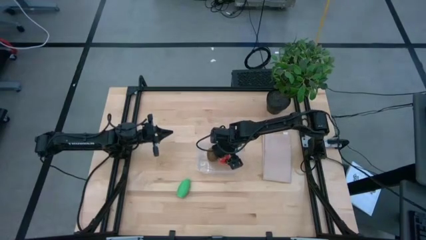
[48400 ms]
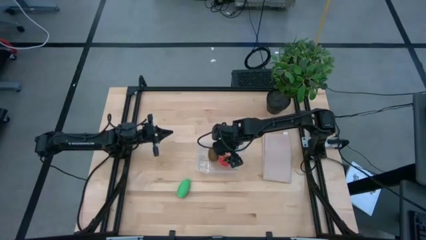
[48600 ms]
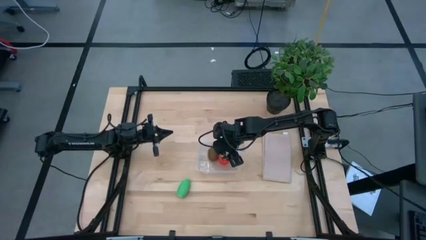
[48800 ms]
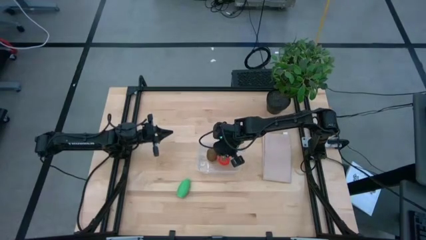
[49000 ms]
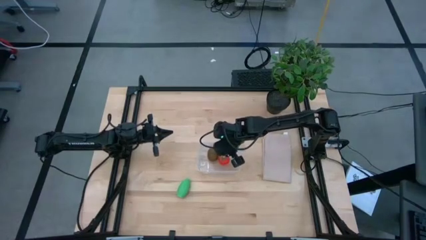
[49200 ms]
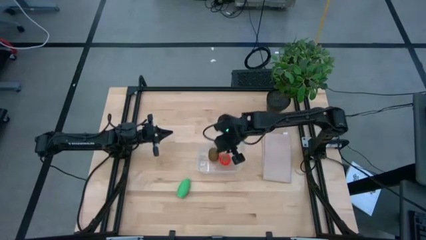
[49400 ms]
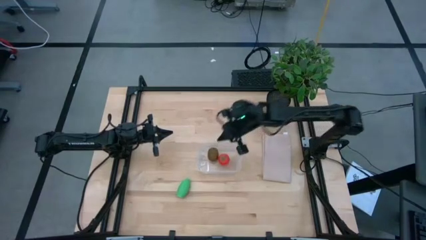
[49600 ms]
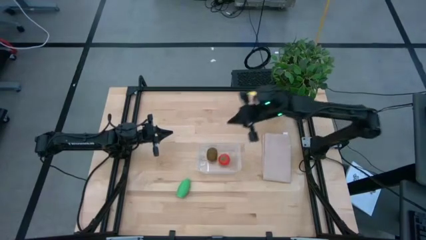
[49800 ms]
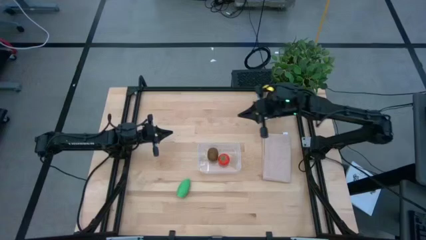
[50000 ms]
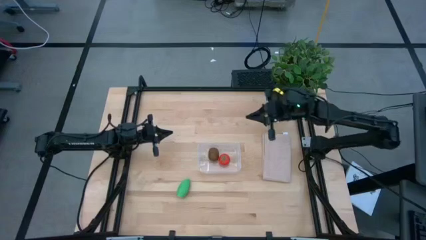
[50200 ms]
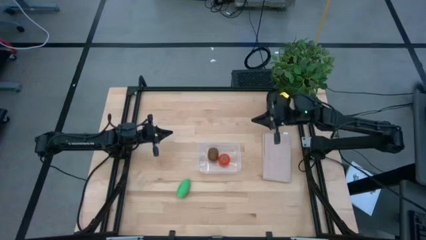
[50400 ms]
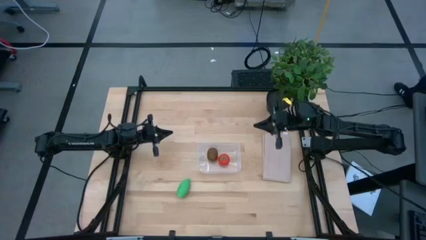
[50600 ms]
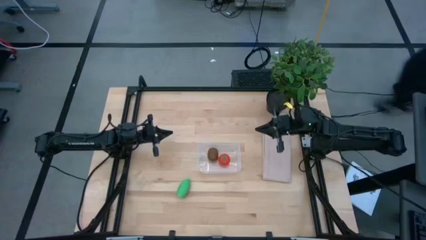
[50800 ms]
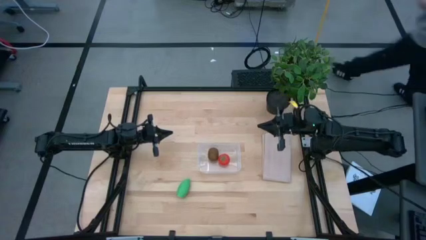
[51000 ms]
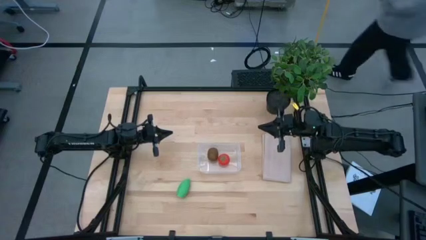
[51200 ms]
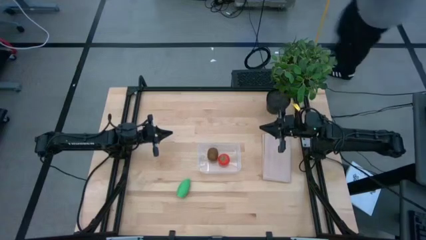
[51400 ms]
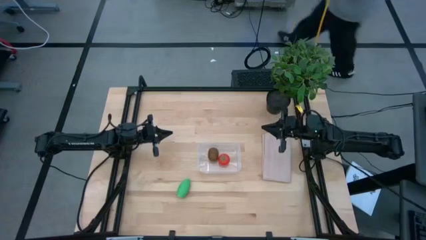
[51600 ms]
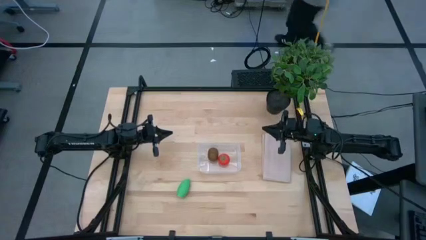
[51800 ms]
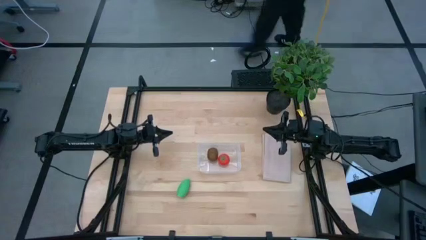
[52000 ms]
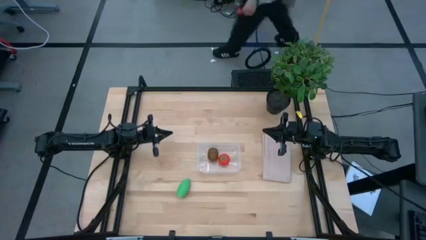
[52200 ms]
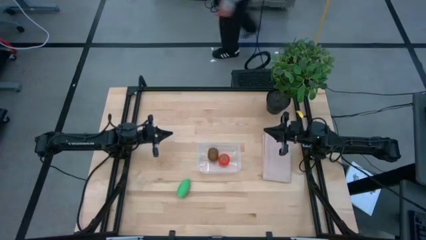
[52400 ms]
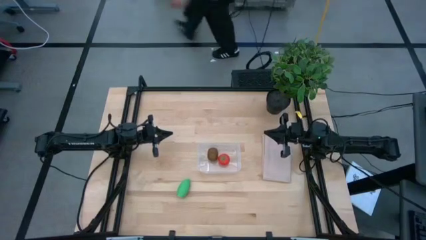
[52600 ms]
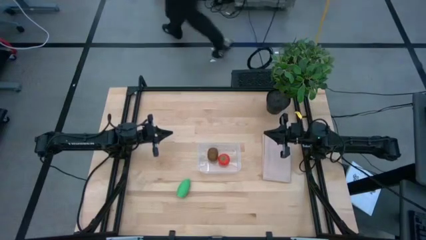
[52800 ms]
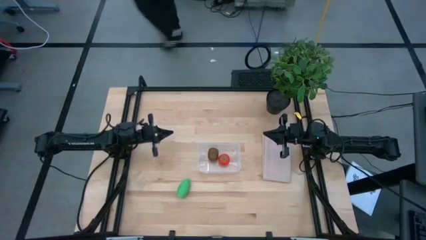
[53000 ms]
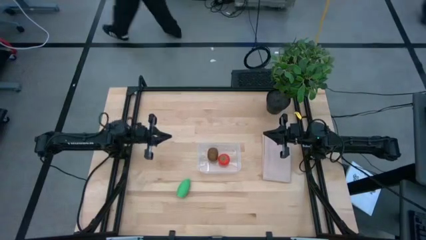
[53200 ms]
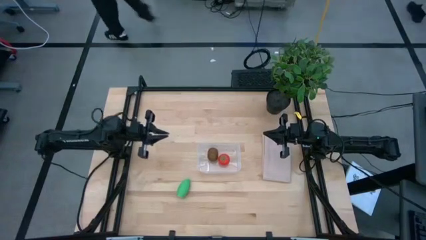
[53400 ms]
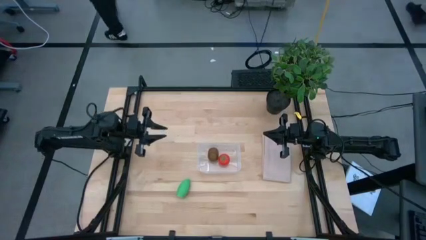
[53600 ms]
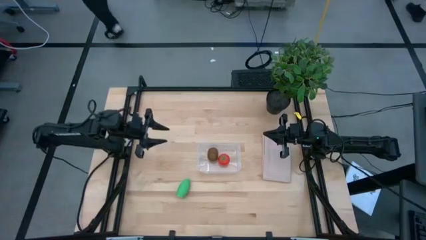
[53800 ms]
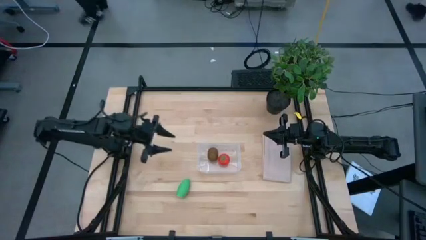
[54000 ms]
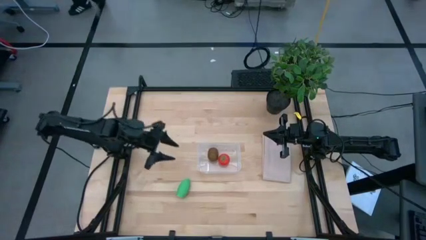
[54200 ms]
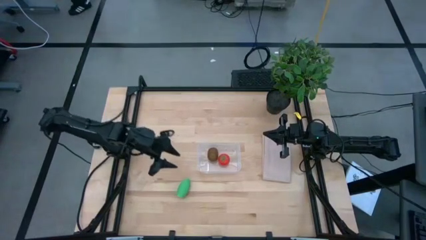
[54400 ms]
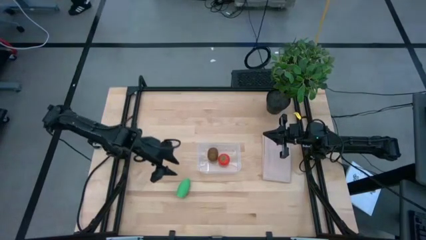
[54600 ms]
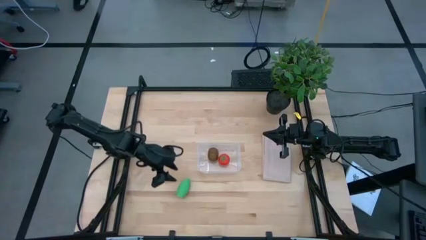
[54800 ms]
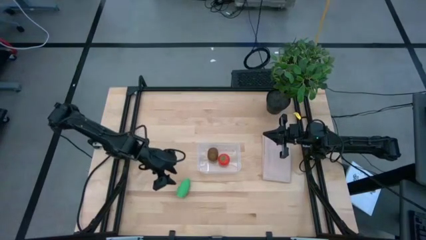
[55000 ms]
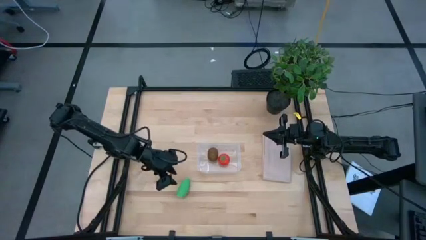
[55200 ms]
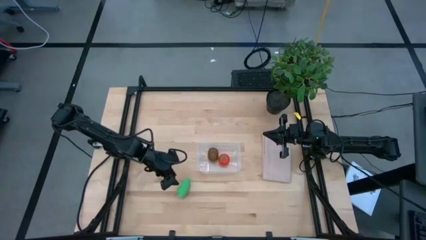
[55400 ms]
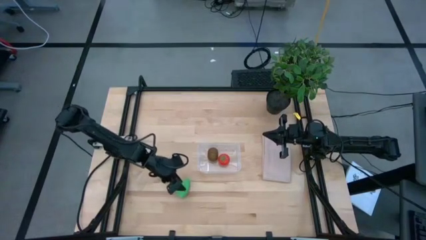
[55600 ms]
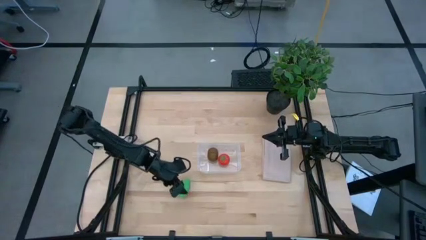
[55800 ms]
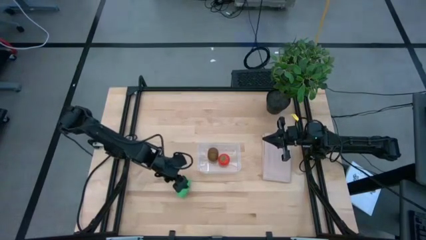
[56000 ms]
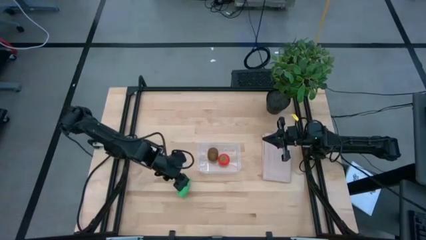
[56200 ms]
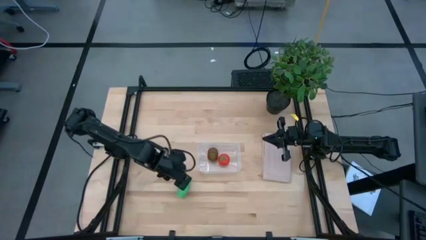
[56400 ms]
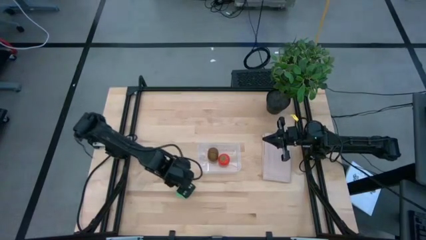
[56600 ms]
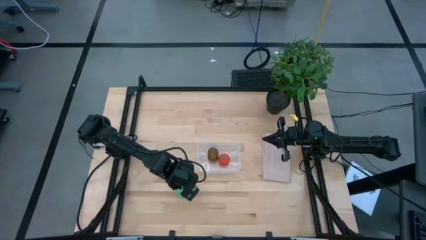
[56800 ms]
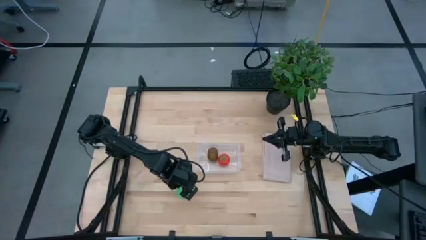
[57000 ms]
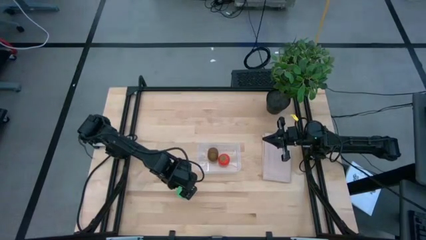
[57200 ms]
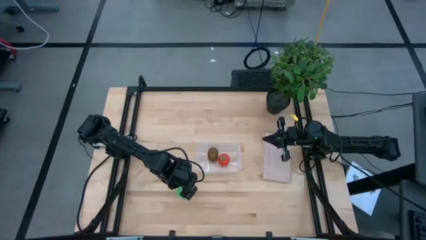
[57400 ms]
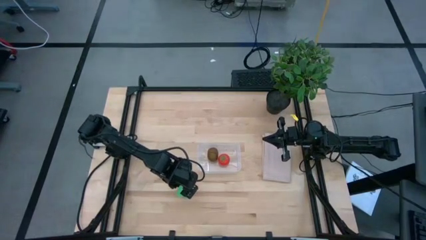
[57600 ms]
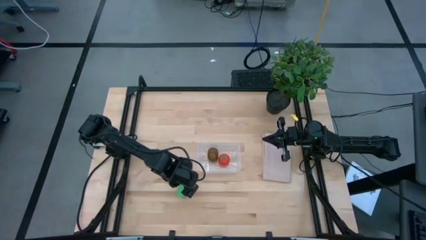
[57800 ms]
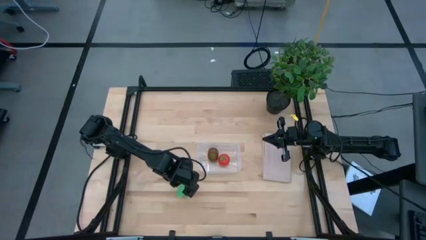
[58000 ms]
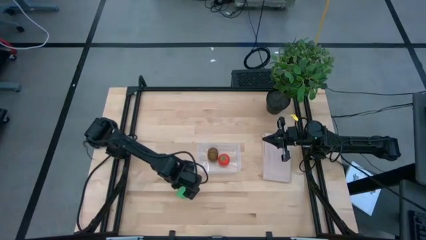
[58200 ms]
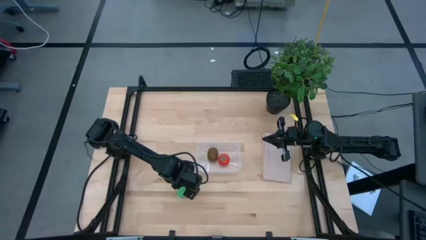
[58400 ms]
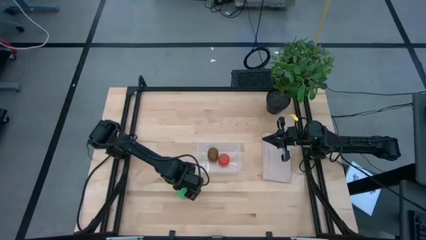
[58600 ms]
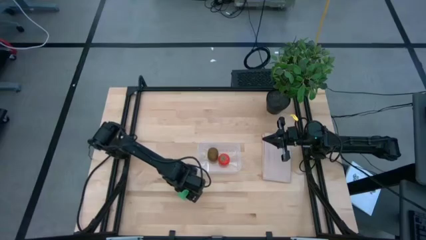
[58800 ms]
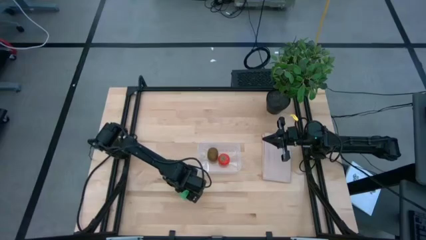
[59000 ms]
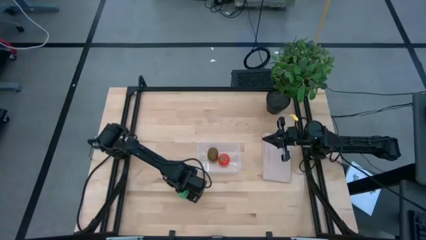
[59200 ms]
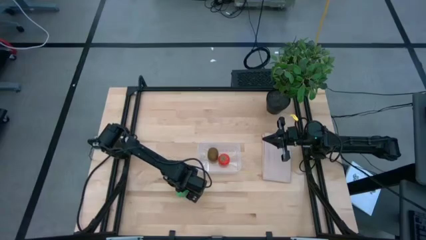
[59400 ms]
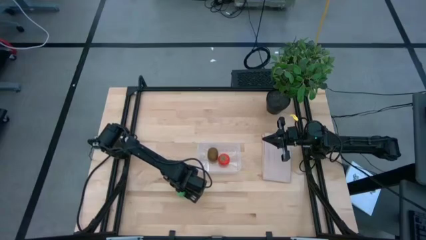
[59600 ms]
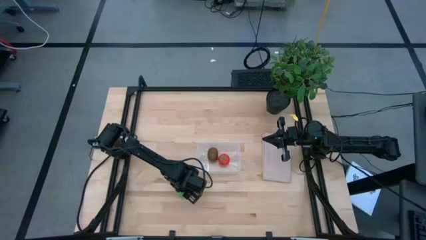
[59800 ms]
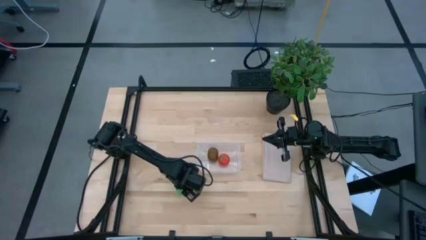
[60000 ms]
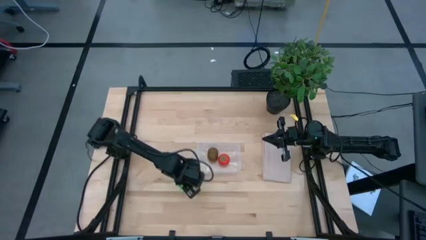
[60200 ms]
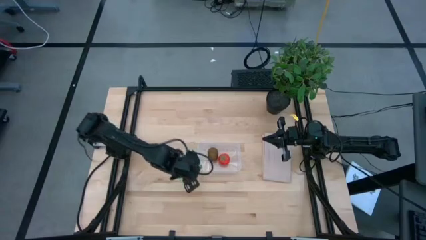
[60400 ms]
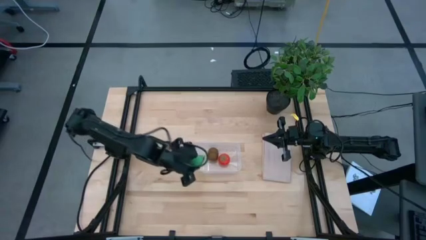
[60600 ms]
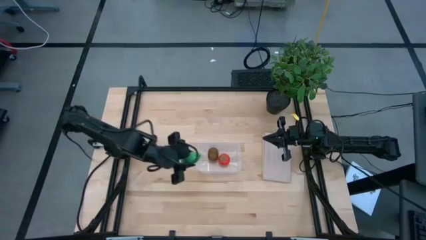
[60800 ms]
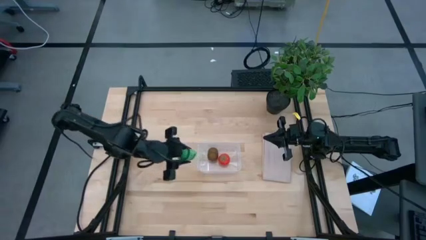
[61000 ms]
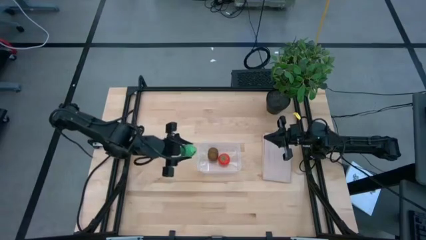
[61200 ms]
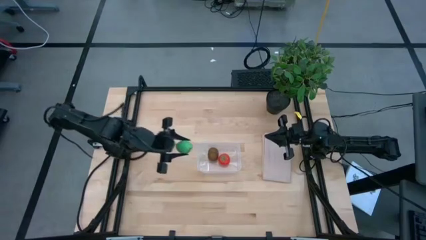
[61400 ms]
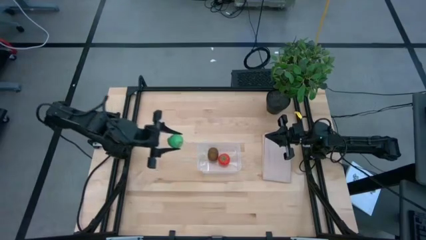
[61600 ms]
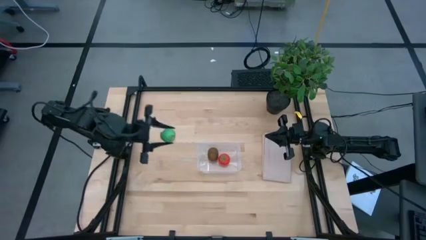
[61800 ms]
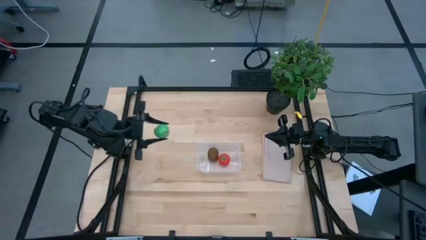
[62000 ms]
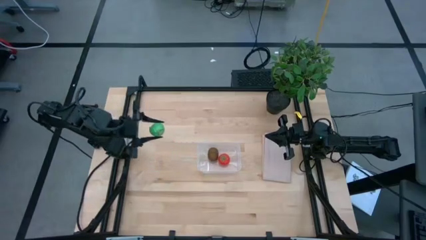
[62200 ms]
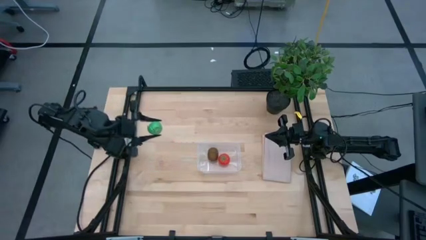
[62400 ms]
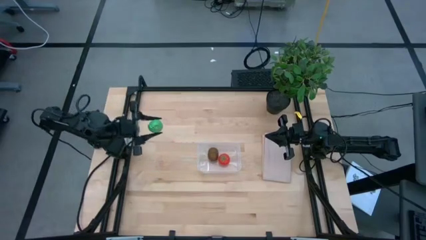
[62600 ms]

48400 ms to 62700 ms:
Task: Pick and placing Produce into tupperware
Put the corn into the transparent bin

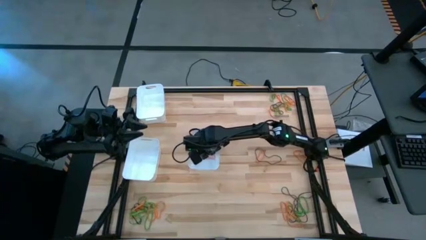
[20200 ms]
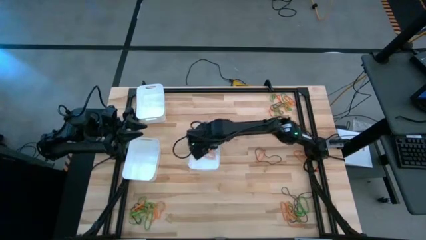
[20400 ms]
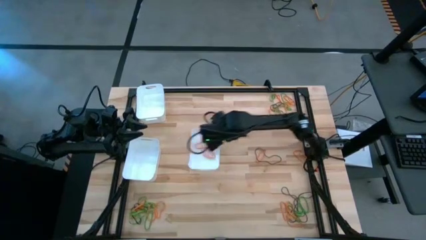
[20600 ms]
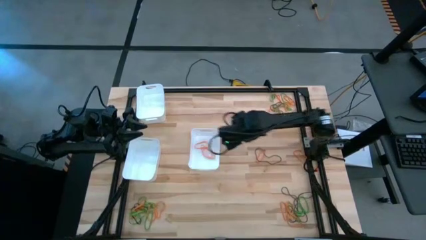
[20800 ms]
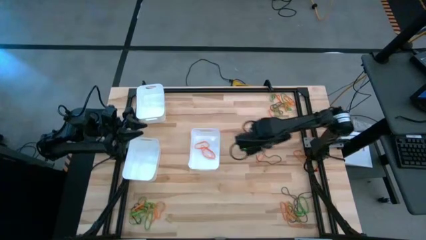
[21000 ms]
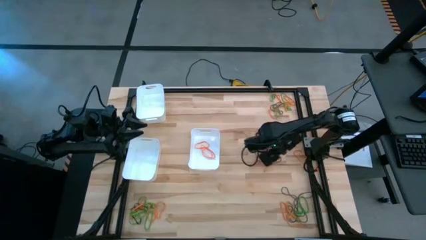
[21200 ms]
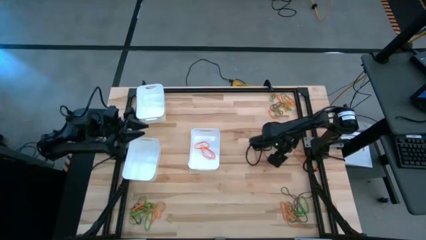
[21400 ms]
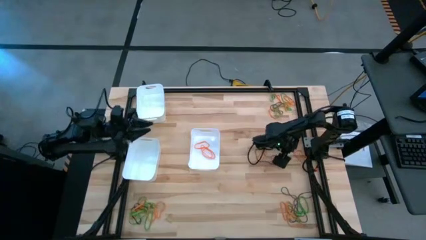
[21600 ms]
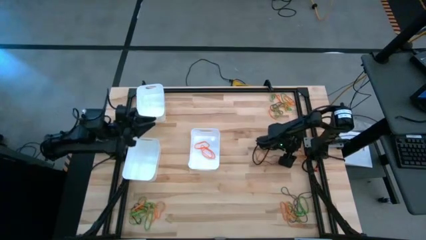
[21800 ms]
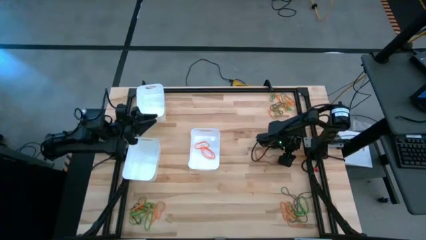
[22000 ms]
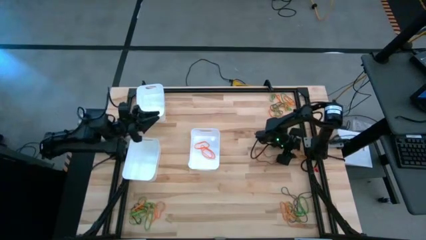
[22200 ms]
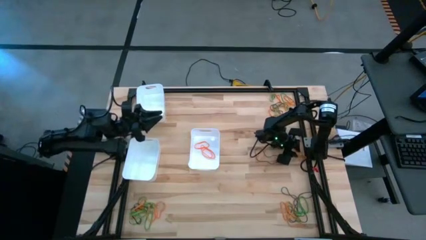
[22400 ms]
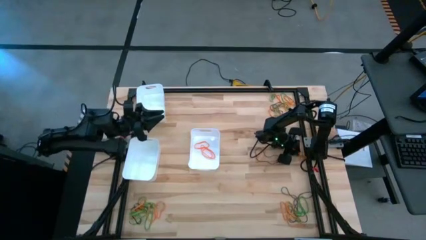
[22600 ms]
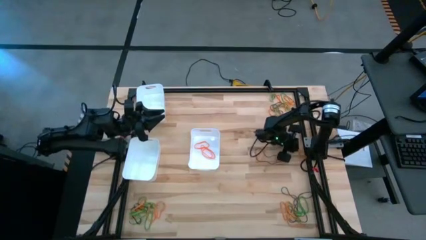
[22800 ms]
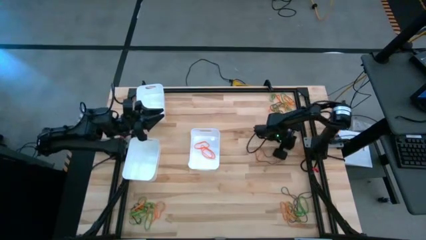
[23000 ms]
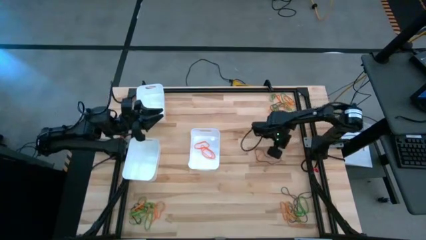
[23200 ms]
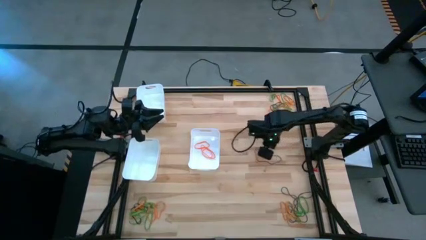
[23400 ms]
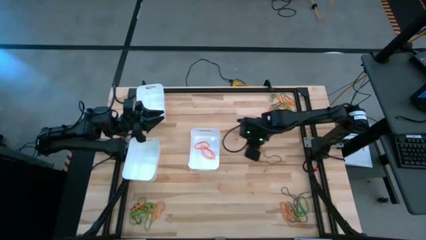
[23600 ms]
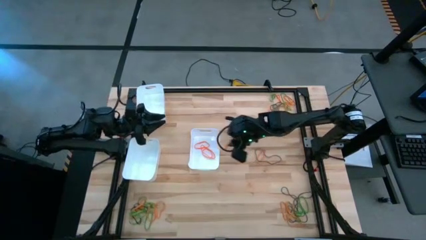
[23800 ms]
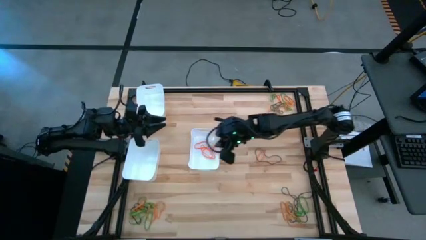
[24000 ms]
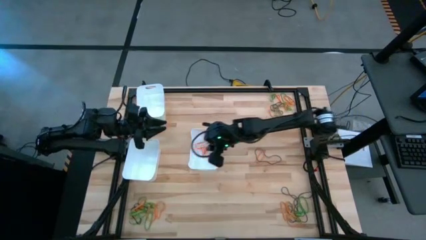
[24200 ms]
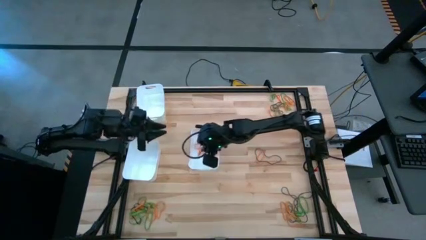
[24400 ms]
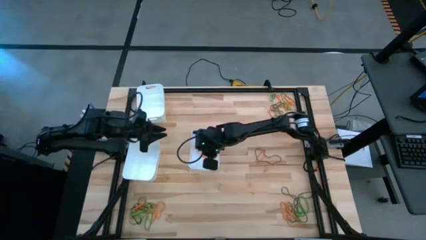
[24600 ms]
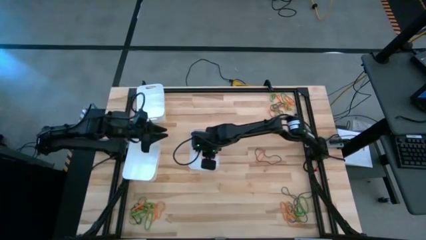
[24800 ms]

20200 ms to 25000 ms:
Task: Sort rubber bands into baskets
Put the orange rubber band into the bottom right white bin
